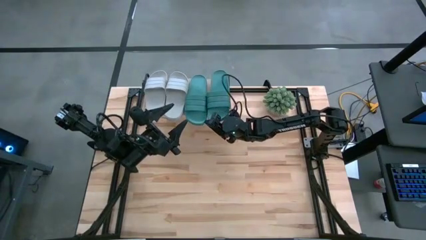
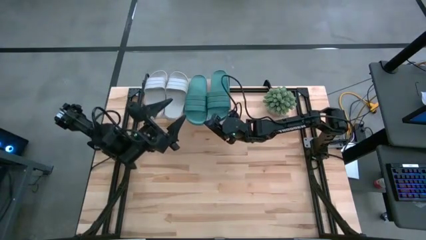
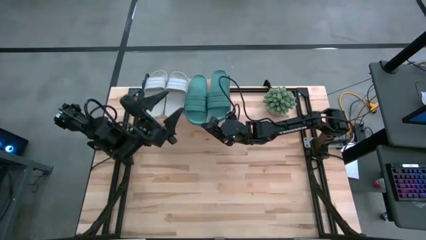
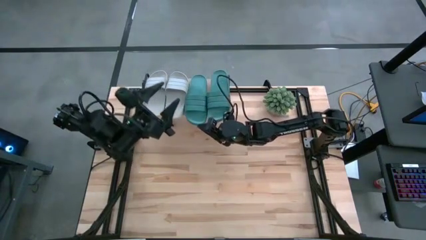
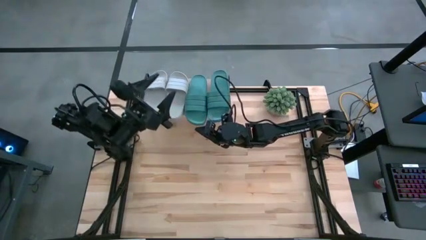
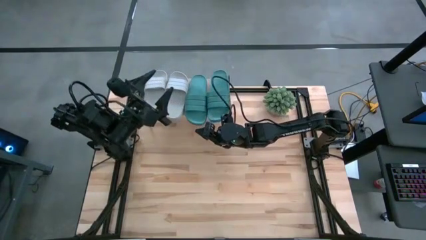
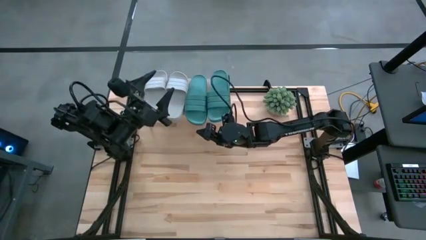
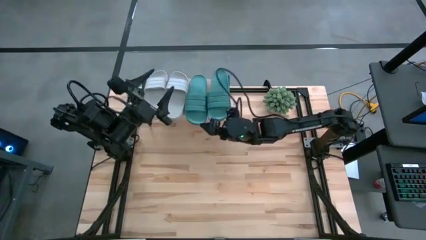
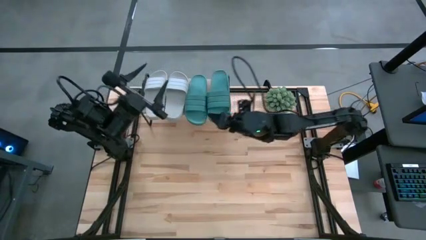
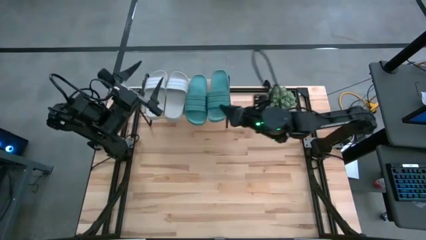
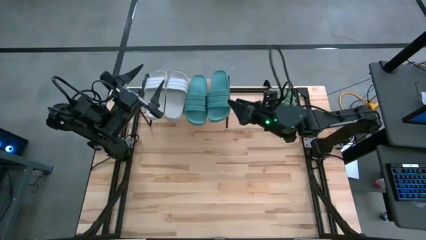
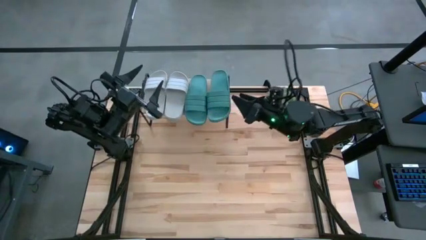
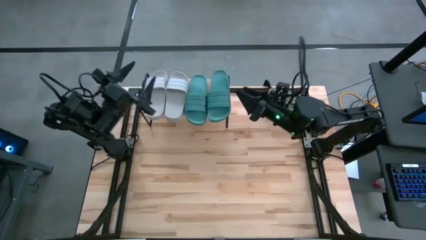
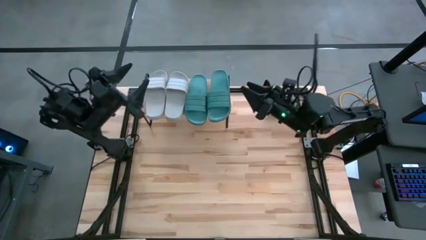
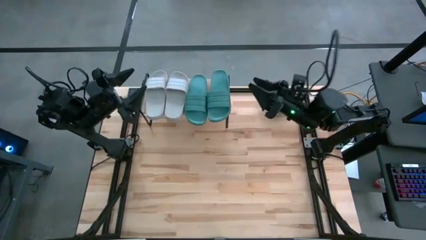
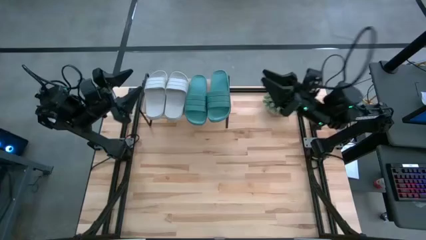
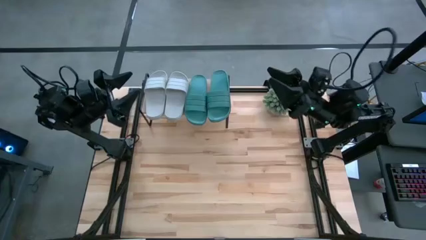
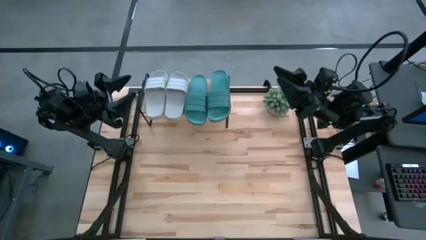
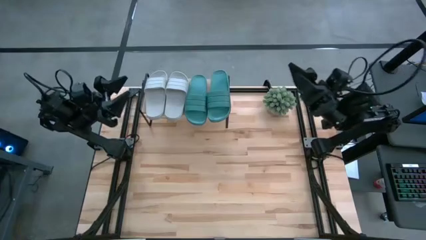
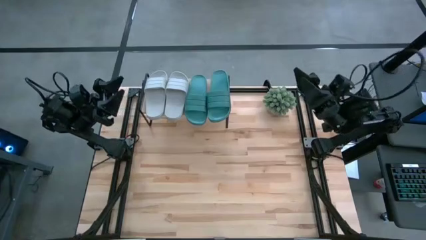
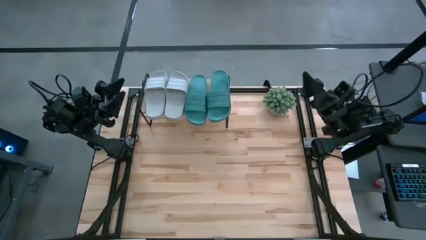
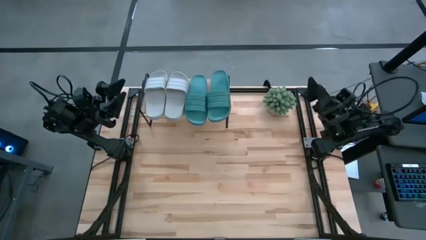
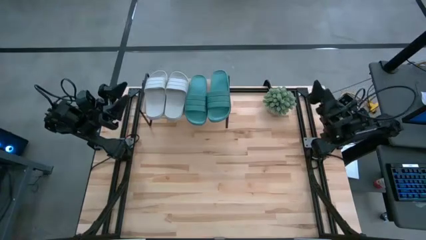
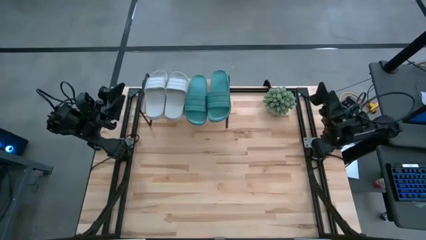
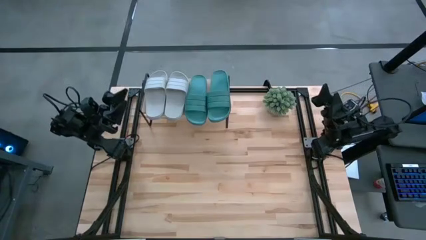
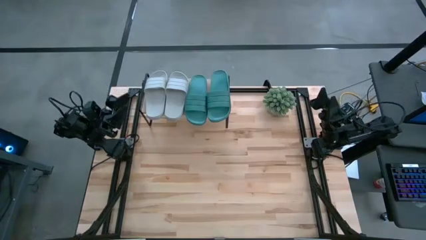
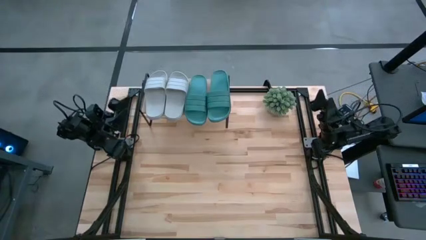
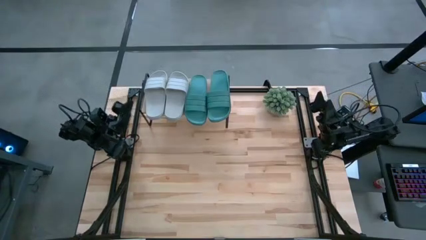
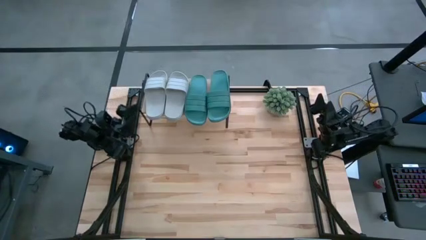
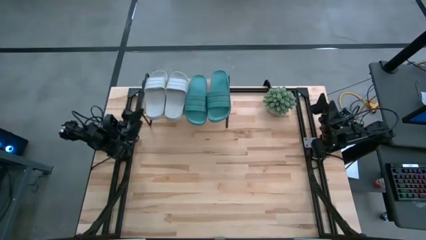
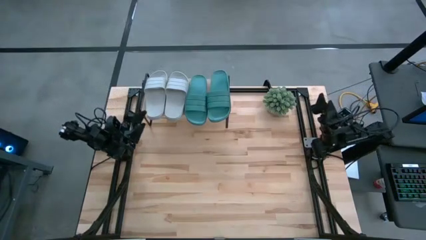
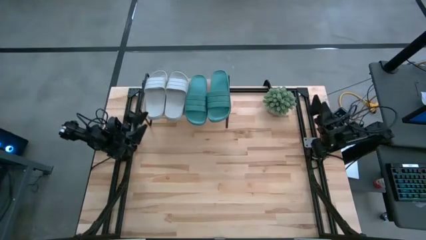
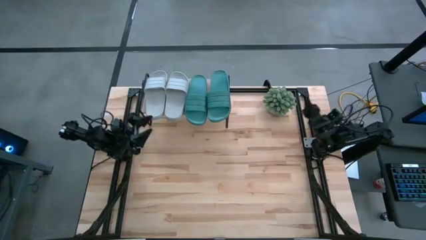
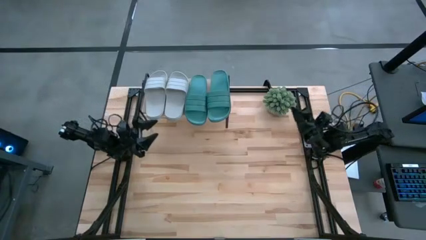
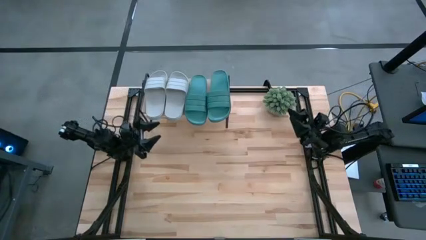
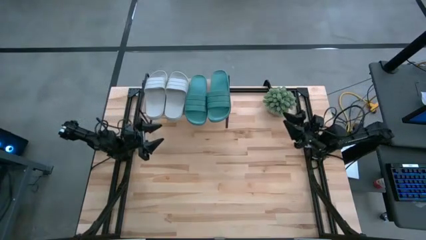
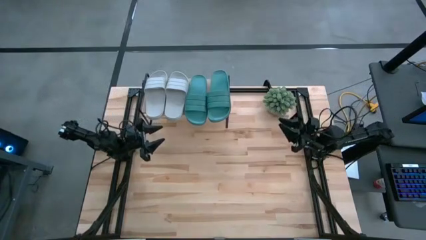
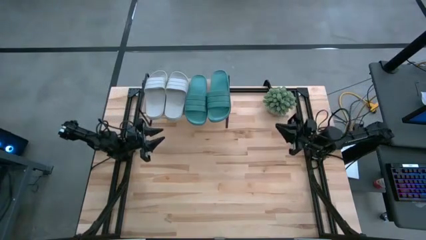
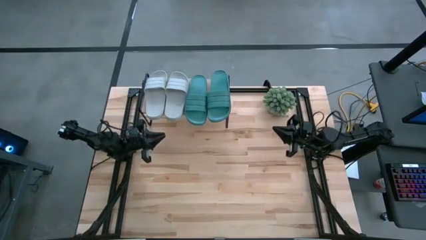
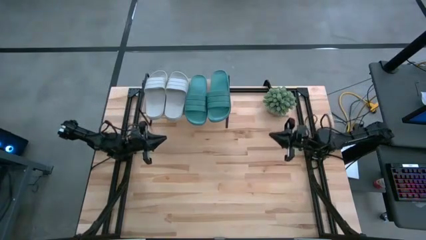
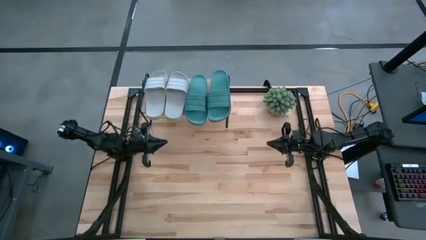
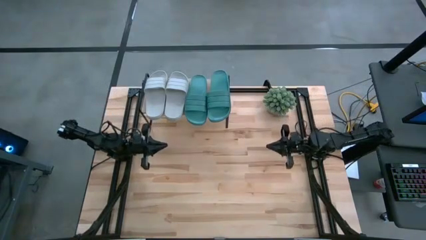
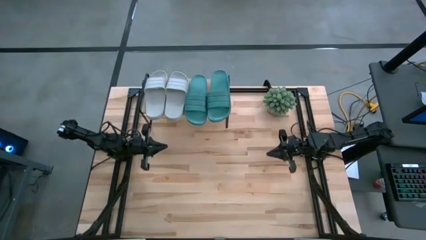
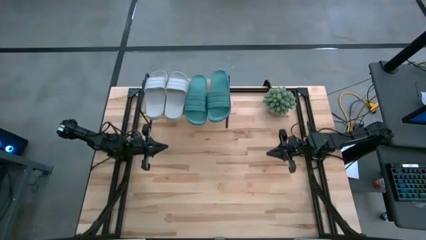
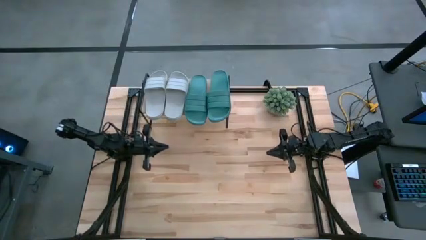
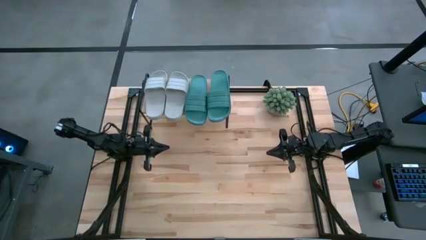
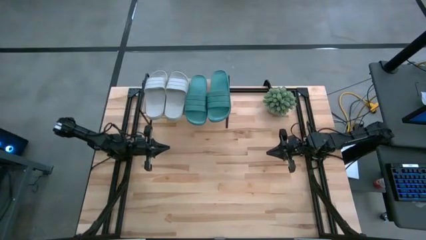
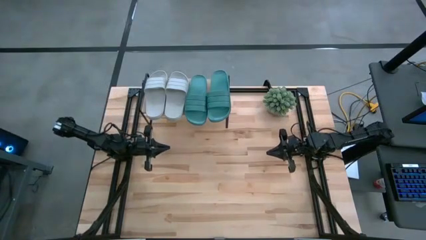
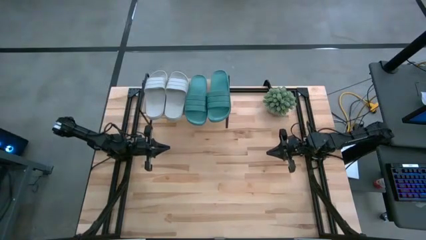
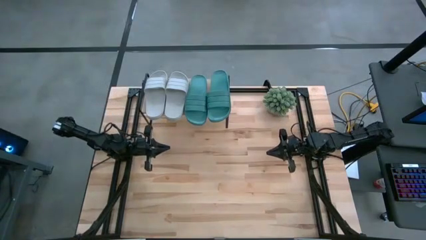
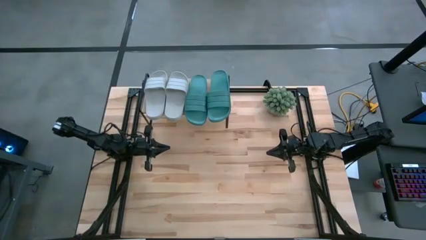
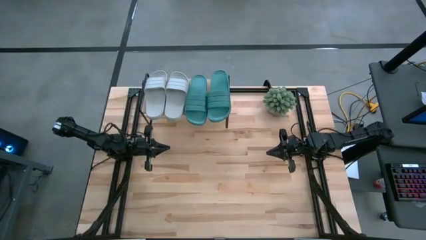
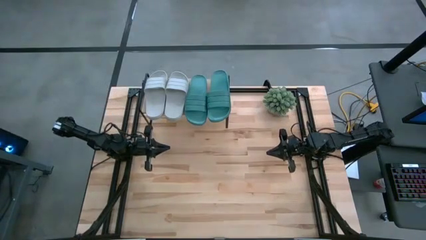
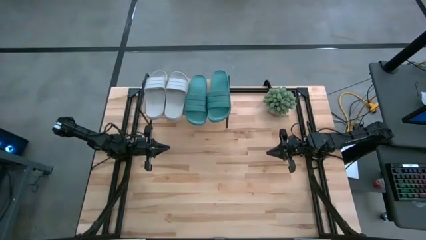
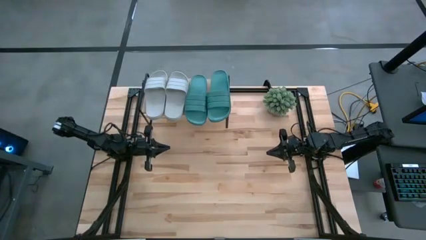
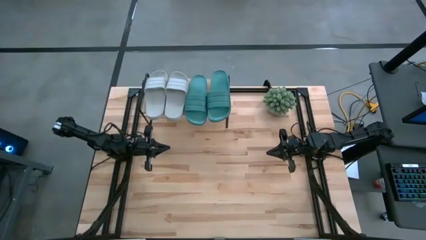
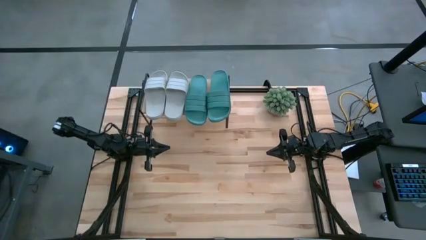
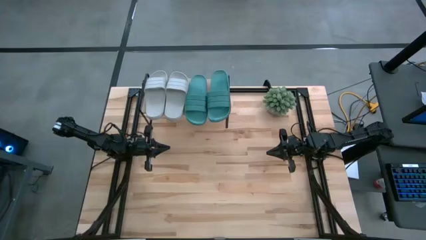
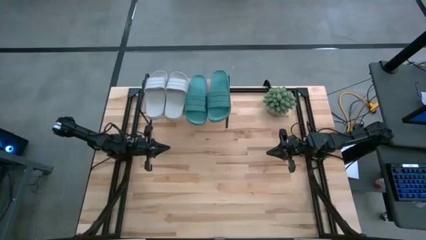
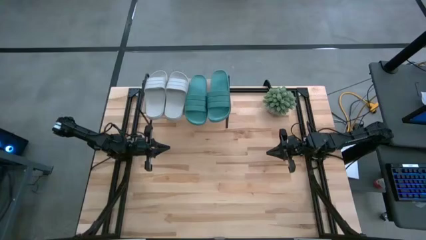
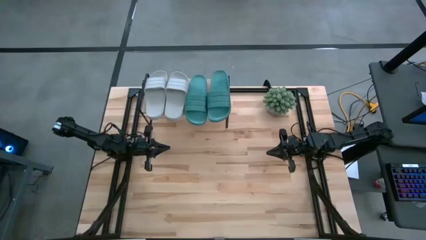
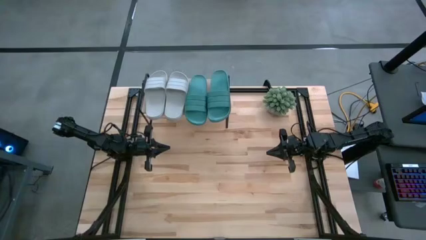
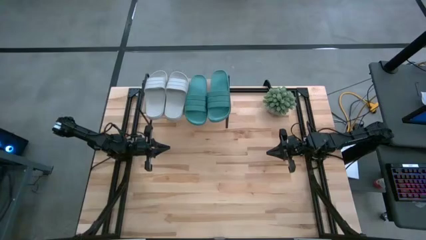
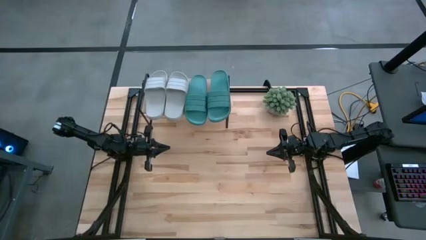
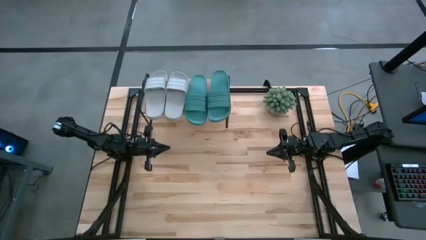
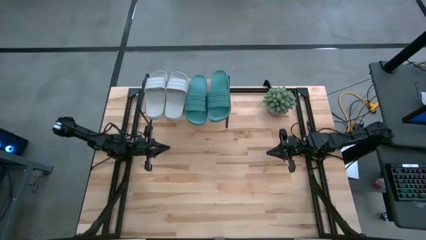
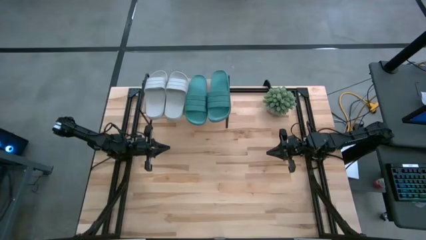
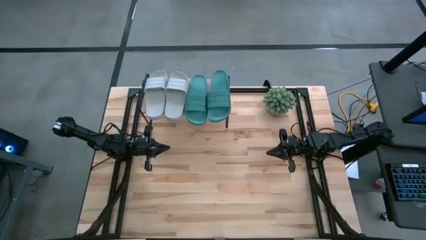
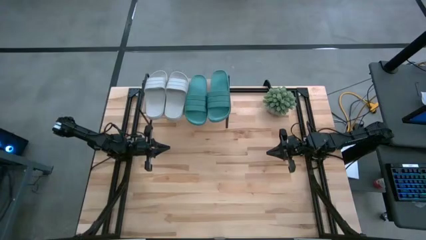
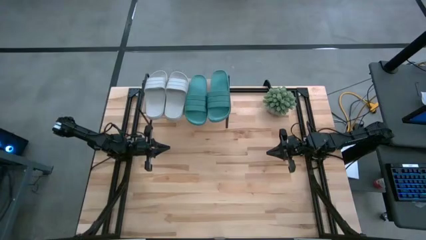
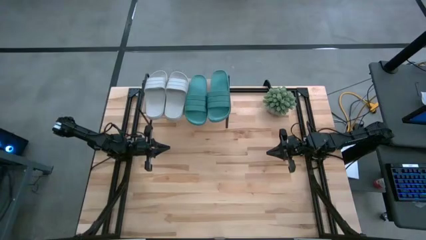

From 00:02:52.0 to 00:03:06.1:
Task: Pick and place slides into the shelf
Return to Home Position
